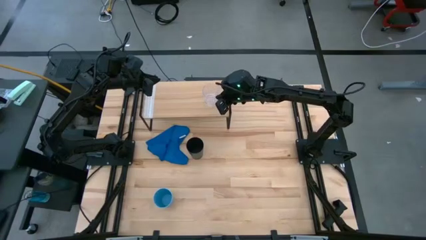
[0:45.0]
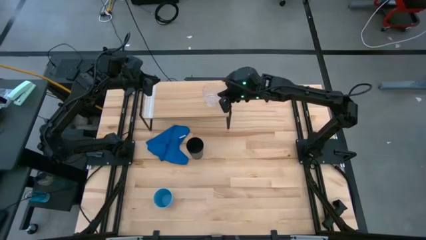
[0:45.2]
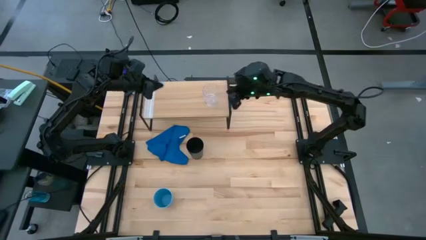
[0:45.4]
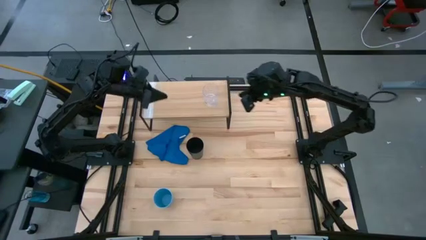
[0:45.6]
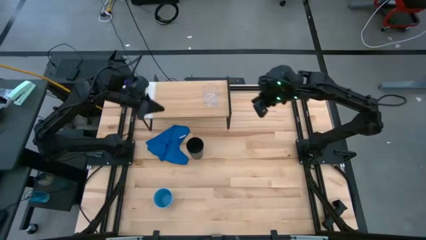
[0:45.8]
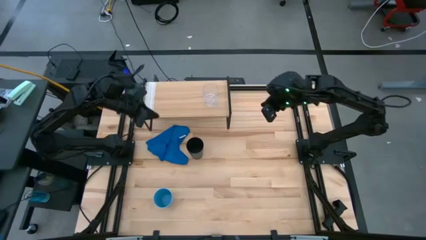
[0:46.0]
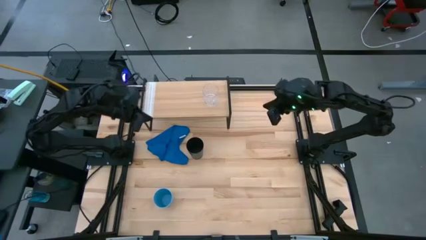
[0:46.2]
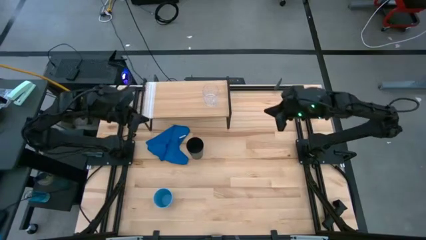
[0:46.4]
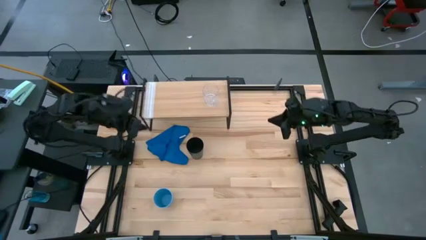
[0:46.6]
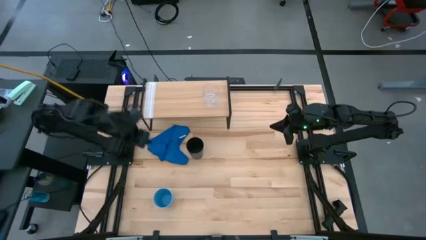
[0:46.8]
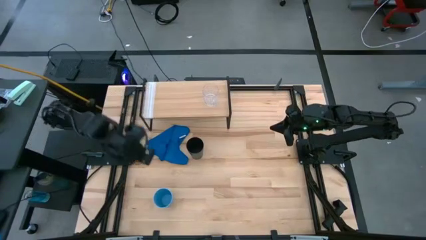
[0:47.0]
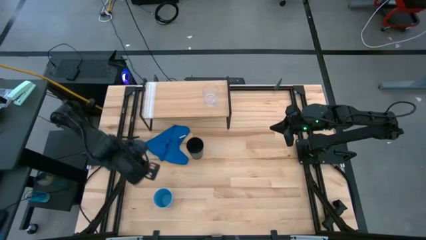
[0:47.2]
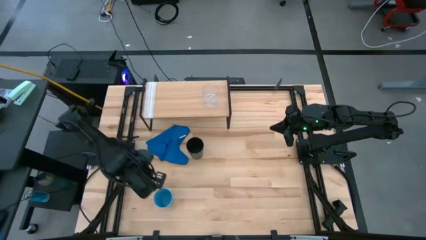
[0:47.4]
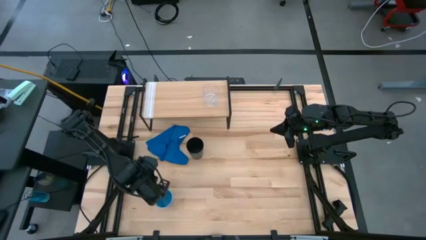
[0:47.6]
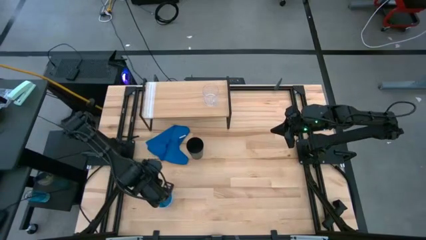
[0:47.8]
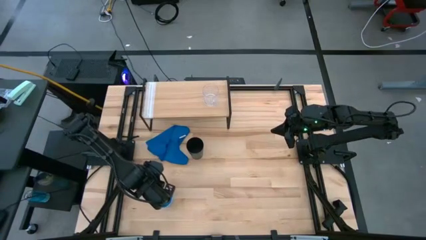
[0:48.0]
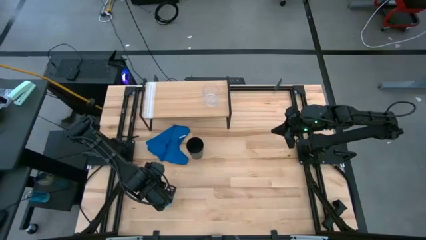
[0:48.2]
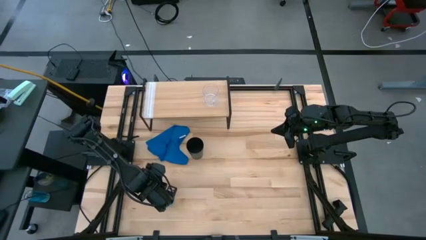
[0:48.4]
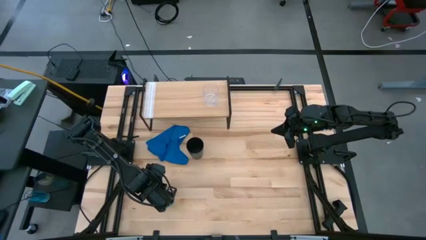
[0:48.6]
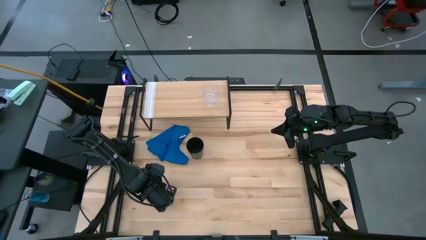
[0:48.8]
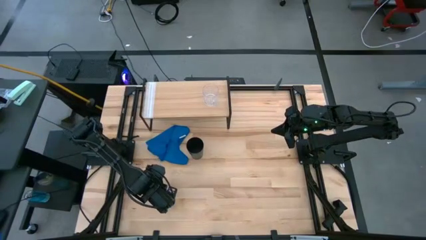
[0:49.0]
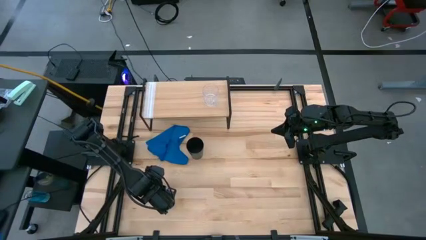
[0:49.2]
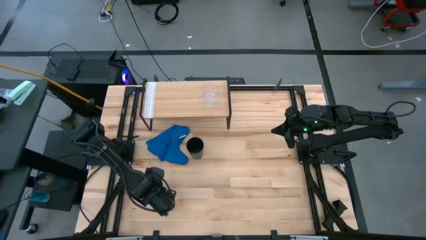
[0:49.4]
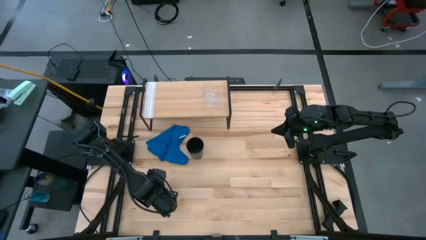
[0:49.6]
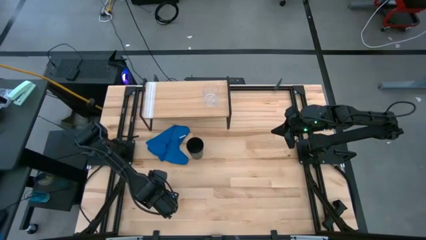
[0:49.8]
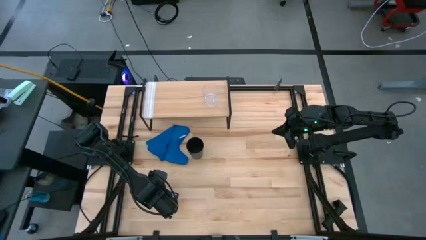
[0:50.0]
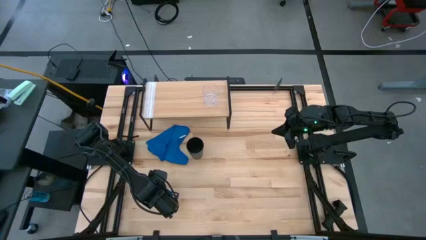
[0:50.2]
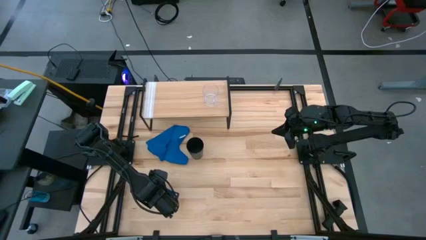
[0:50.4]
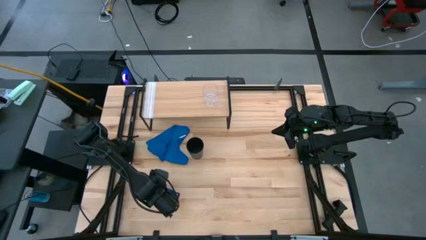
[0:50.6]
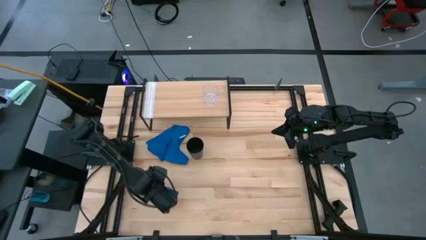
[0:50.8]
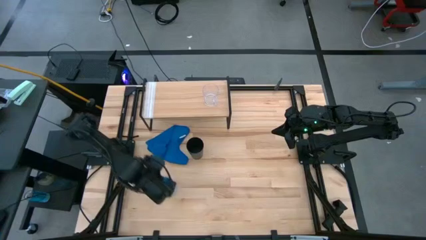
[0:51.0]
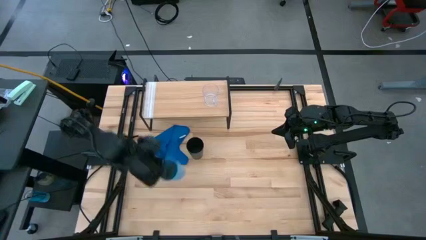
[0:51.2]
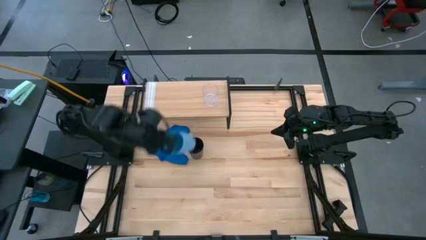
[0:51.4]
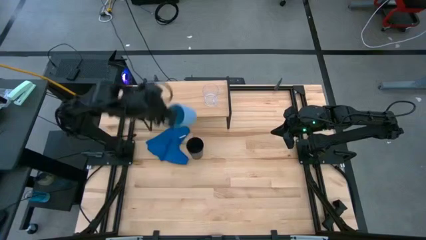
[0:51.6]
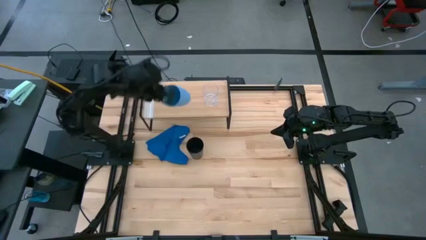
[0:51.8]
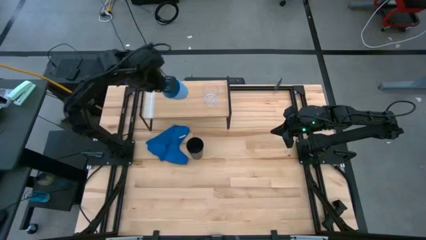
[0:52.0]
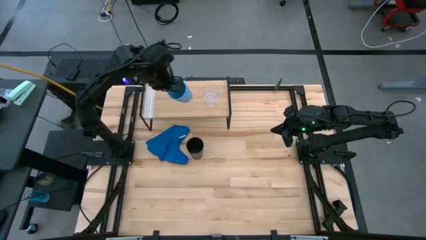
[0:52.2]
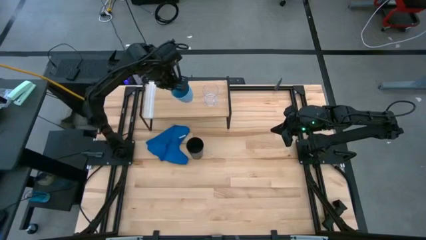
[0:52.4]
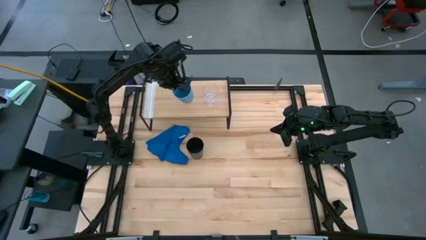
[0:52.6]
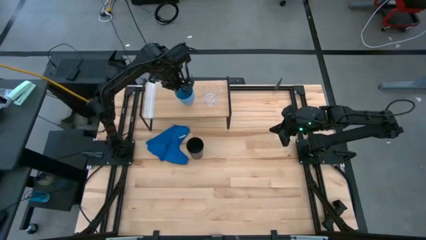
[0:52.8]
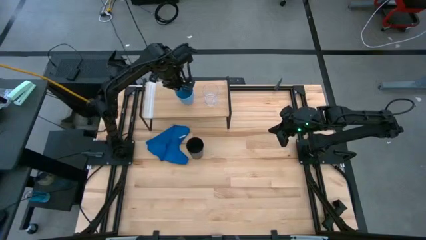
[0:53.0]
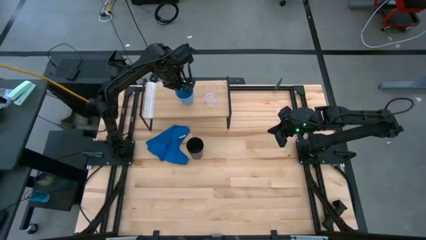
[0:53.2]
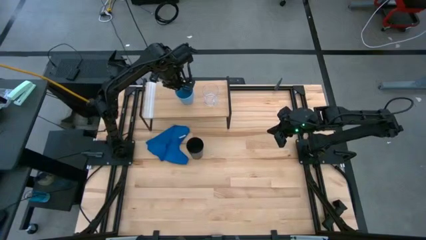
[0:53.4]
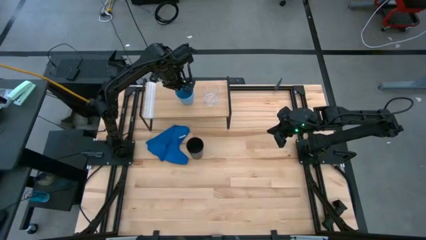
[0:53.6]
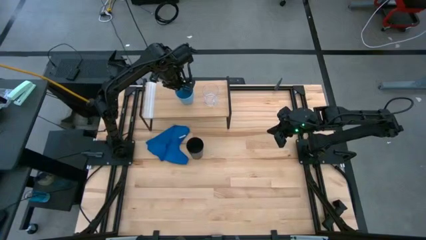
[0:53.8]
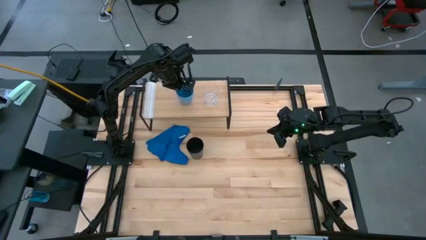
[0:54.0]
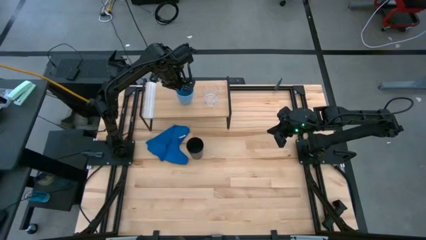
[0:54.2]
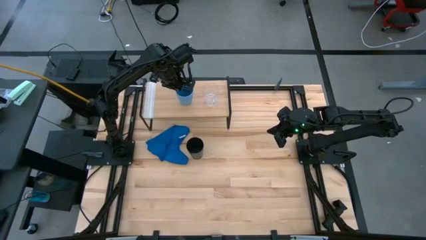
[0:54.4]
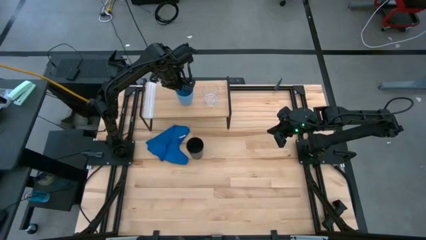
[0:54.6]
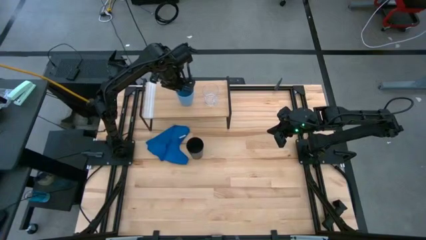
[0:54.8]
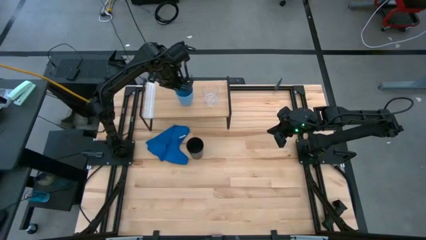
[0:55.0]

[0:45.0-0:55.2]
Task: Stack small to large cups/mugs on shelf
Put the blue cup on the shelf
